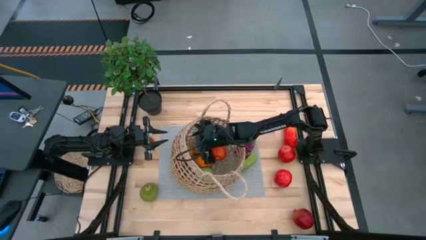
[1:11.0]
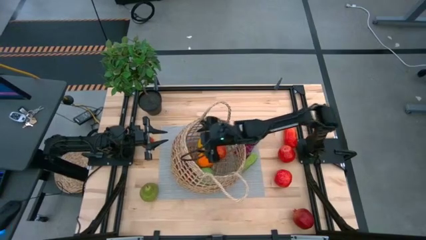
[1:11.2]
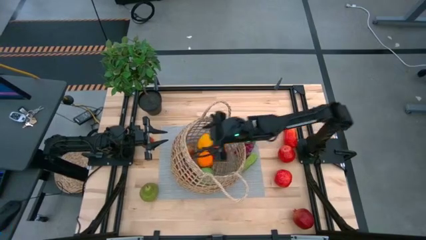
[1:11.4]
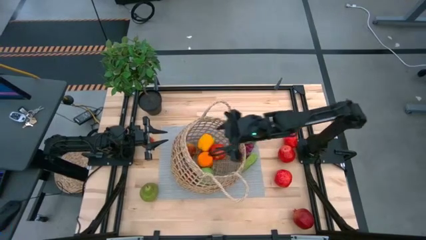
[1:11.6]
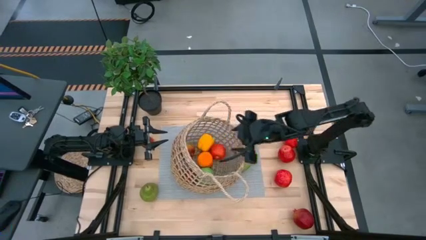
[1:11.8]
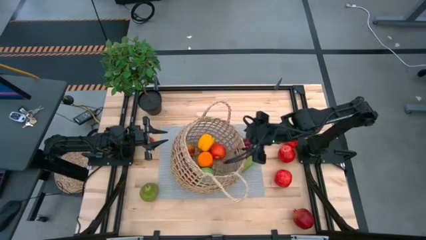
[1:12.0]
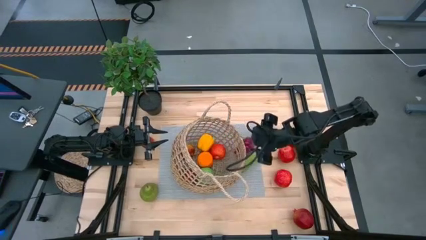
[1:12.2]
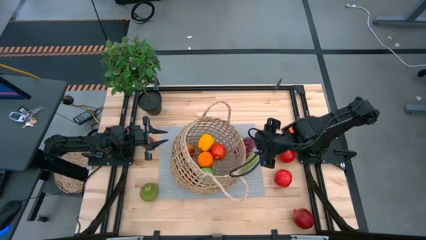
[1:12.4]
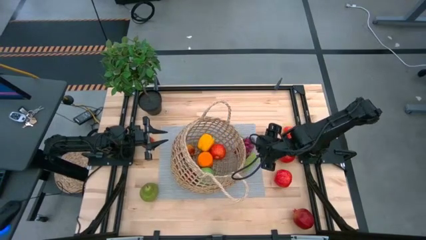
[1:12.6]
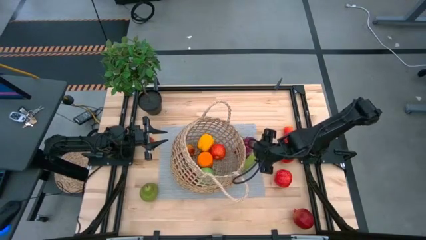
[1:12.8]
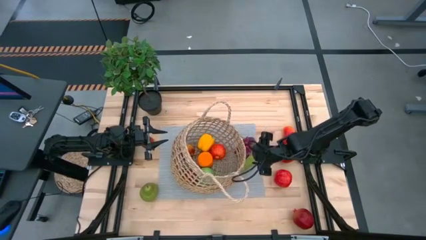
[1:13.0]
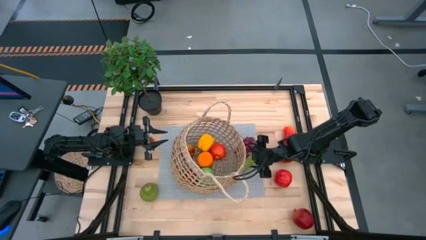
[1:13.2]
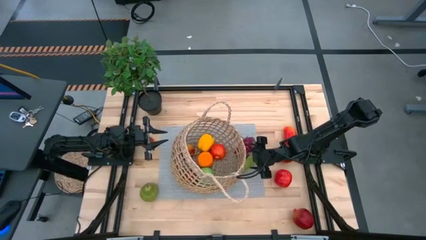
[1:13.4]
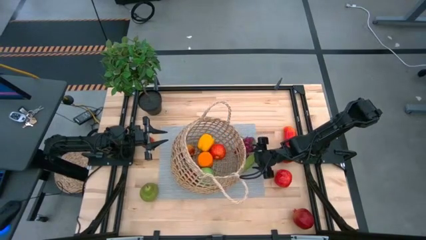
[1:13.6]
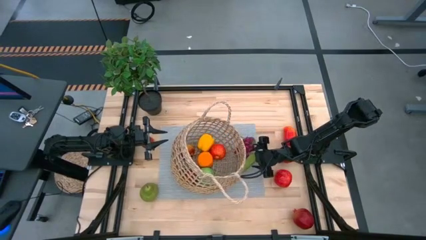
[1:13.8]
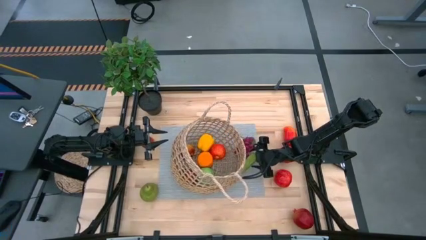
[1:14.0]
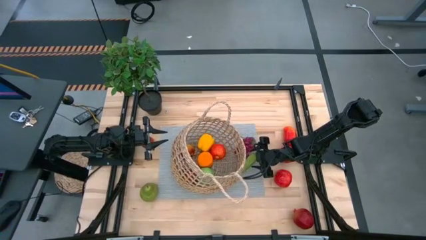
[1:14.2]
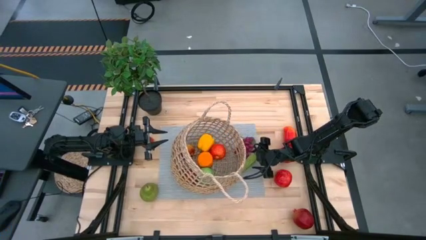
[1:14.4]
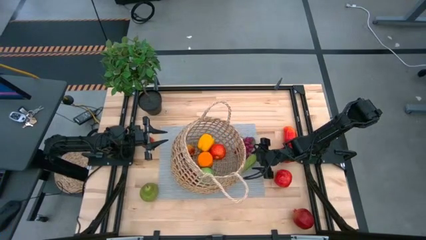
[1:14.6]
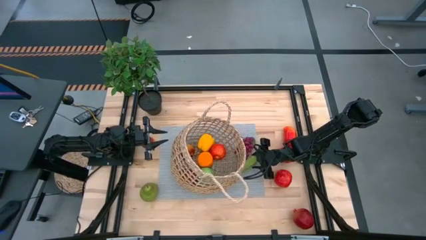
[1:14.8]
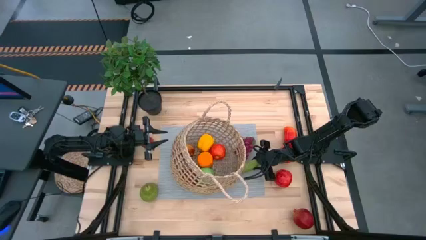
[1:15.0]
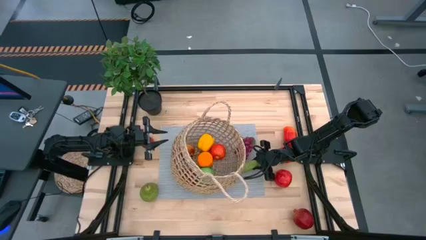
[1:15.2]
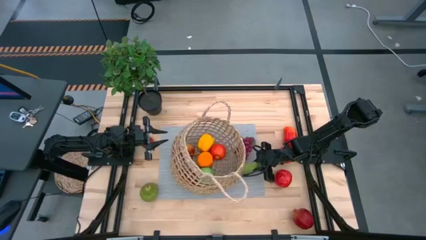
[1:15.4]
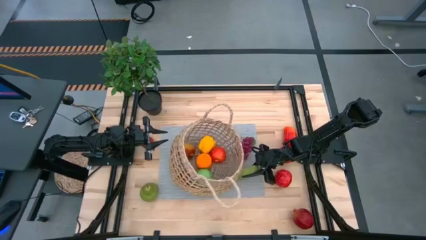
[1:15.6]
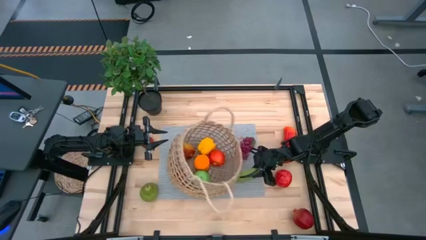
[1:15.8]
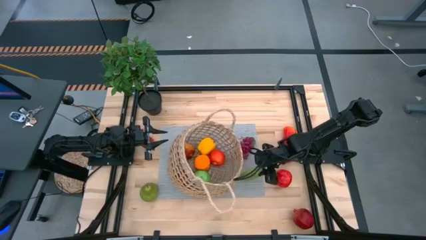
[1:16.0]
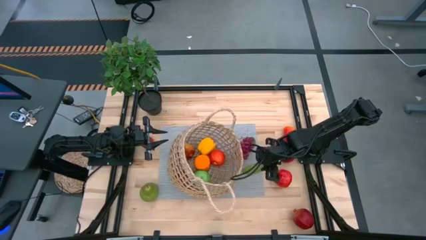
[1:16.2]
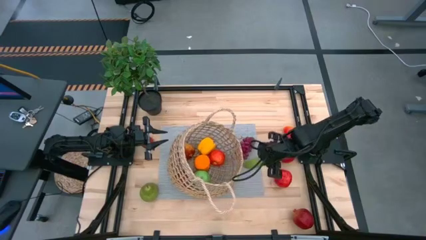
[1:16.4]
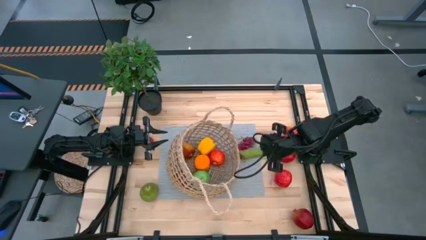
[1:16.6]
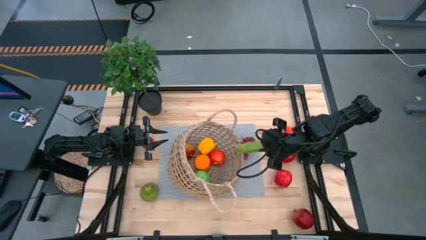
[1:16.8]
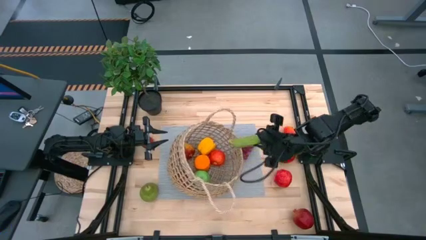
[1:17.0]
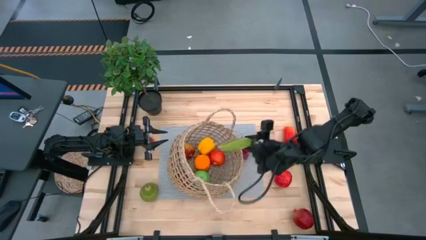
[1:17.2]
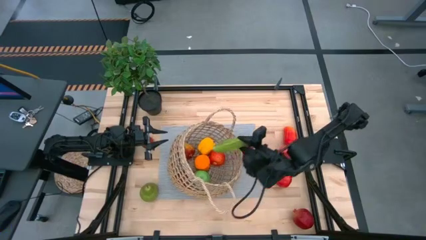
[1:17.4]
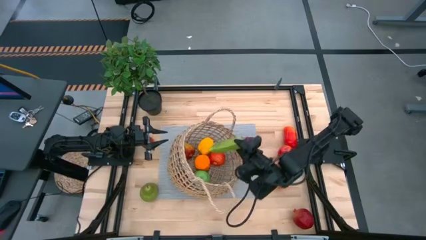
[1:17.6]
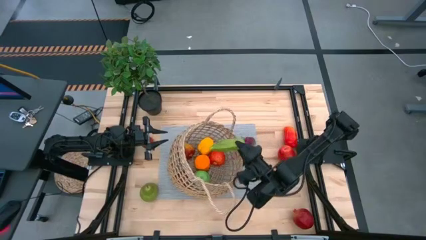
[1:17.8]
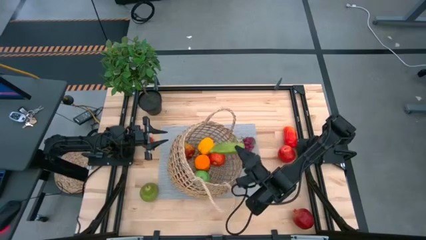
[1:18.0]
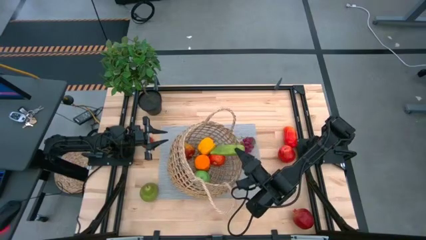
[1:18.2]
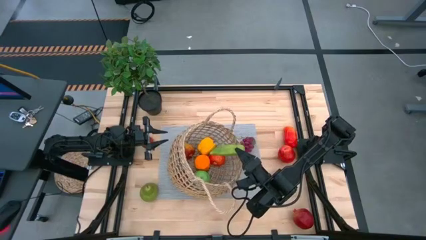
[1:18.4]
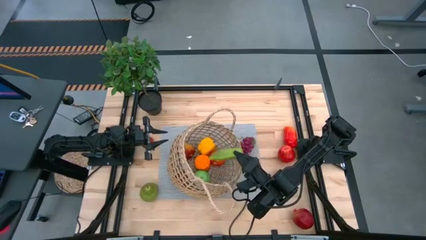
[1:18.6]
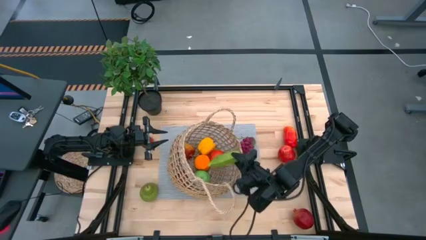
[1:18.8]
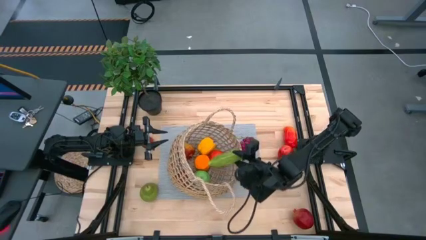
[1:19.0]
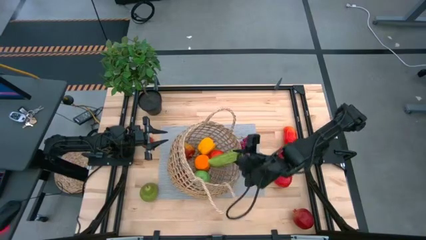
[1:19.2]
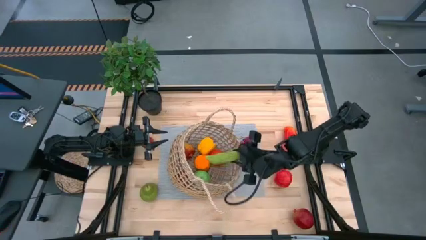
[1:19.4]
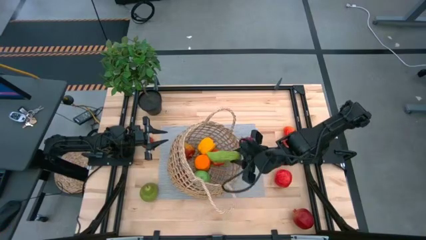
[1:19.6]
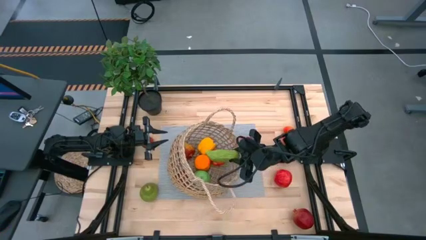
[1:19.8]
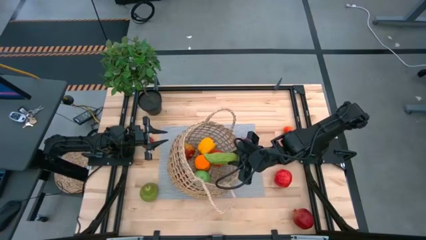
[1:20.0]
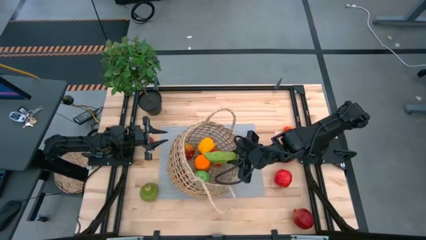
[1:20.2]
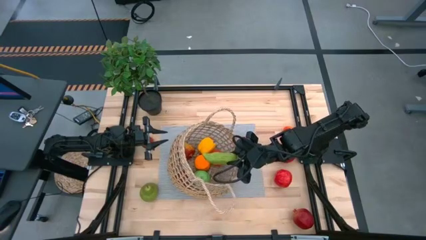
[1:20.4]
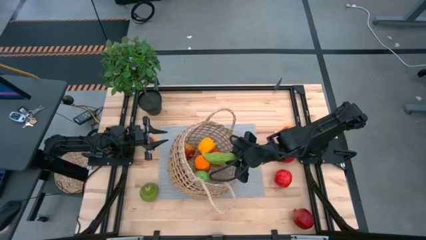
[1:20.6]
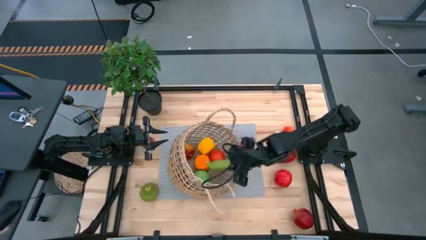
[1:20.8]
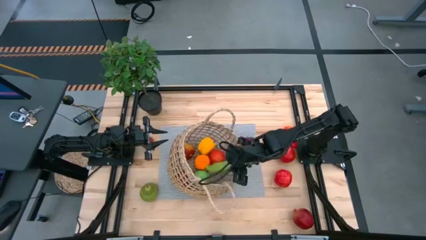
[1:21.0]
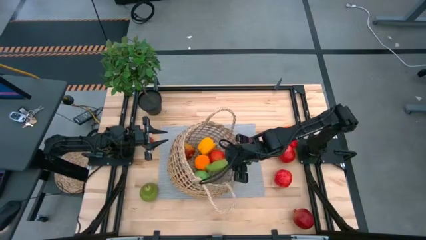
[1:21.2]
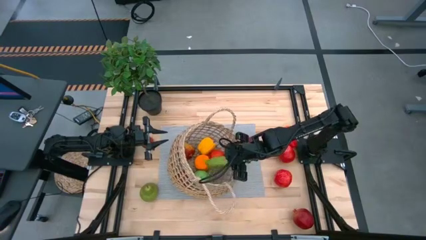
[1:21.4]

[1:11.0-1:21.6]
Task: Build produce basket
Put the green cucumber into the brown basket

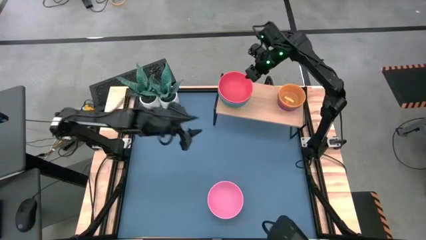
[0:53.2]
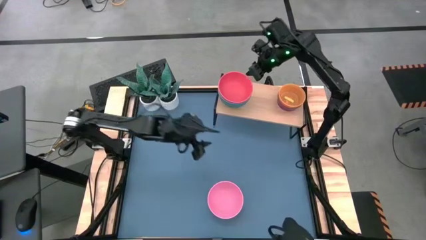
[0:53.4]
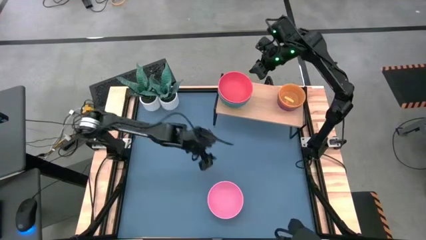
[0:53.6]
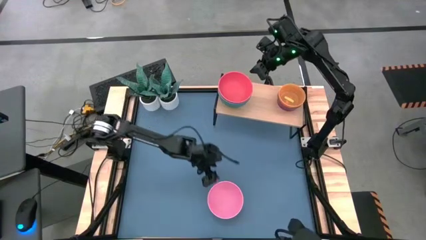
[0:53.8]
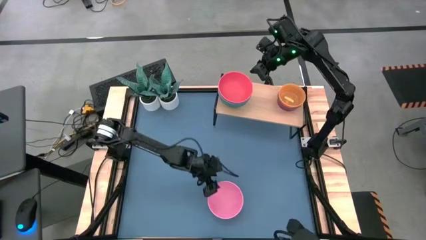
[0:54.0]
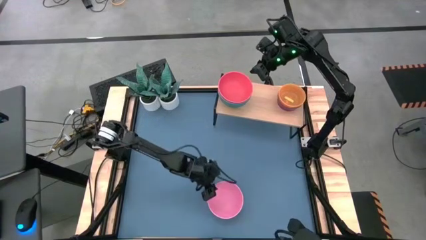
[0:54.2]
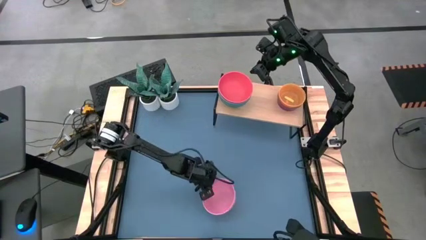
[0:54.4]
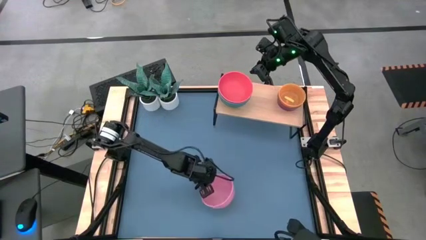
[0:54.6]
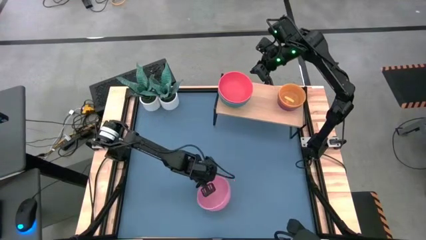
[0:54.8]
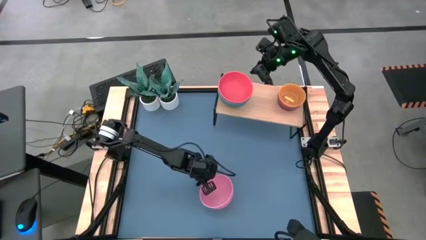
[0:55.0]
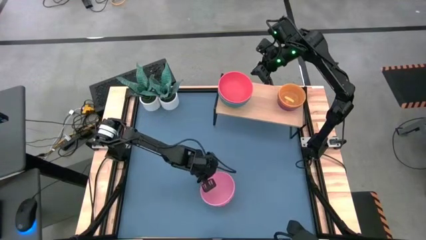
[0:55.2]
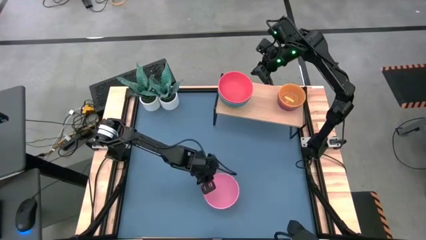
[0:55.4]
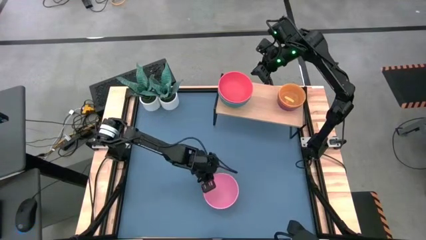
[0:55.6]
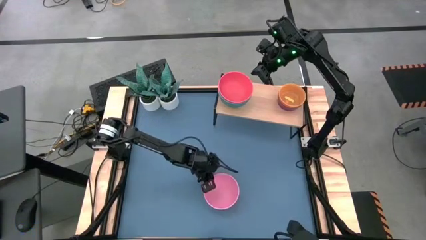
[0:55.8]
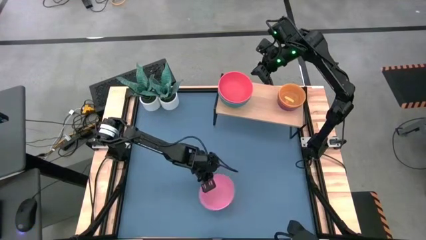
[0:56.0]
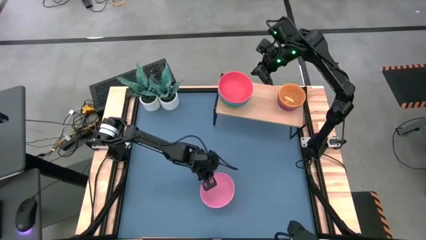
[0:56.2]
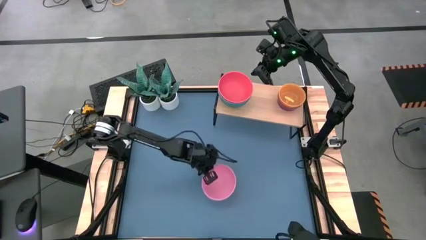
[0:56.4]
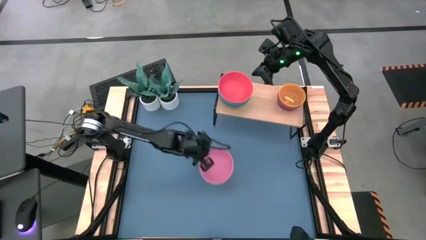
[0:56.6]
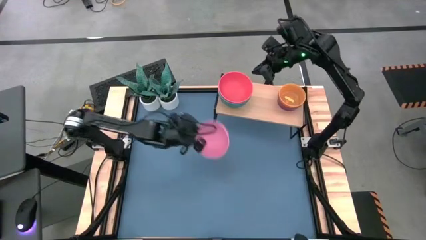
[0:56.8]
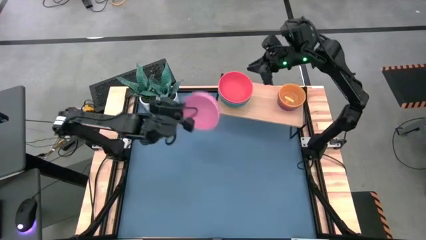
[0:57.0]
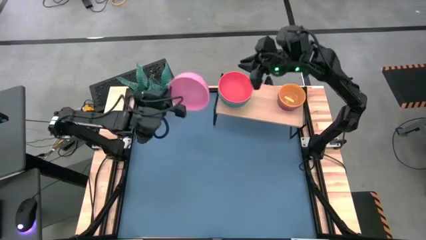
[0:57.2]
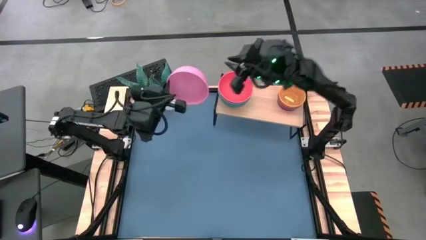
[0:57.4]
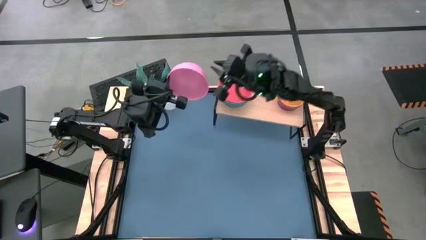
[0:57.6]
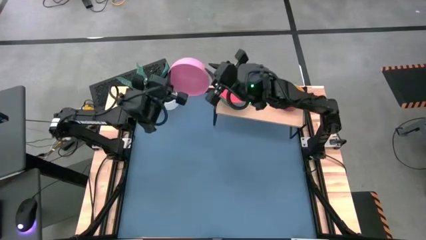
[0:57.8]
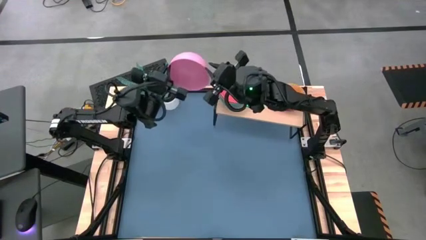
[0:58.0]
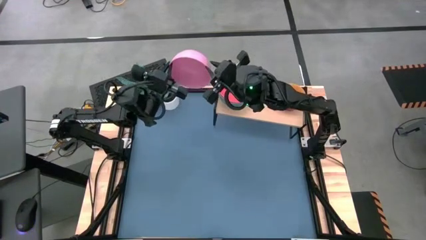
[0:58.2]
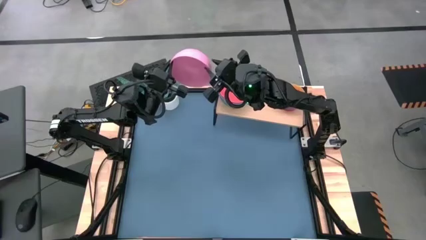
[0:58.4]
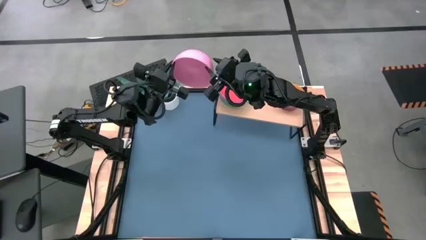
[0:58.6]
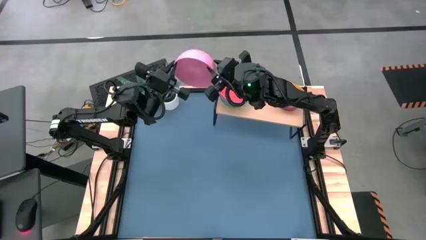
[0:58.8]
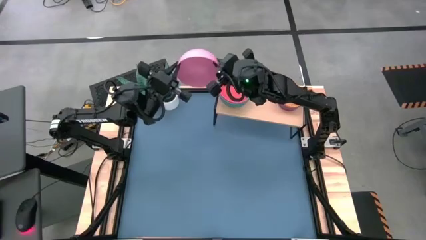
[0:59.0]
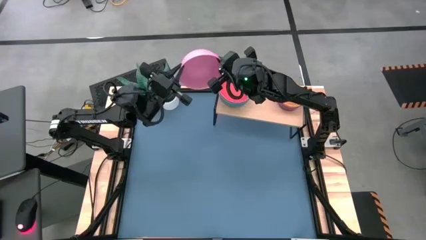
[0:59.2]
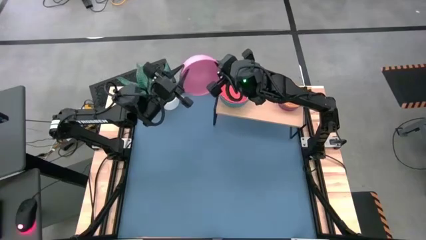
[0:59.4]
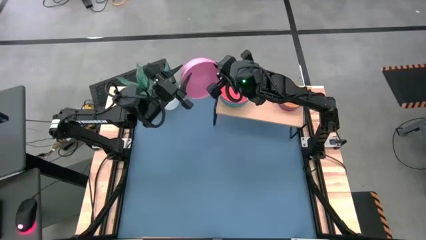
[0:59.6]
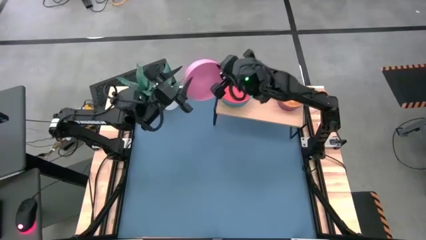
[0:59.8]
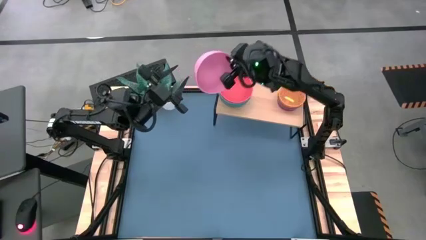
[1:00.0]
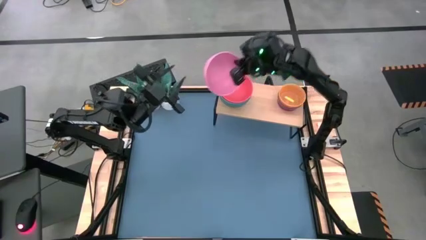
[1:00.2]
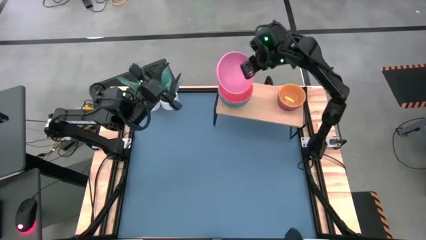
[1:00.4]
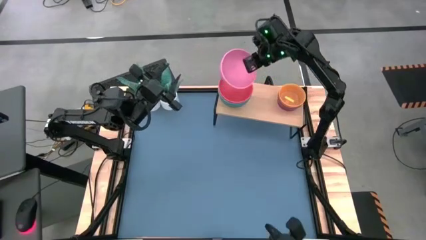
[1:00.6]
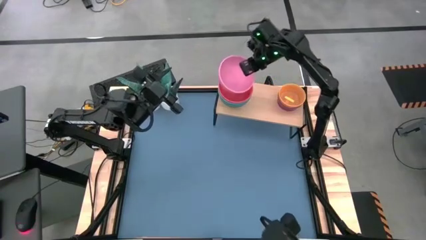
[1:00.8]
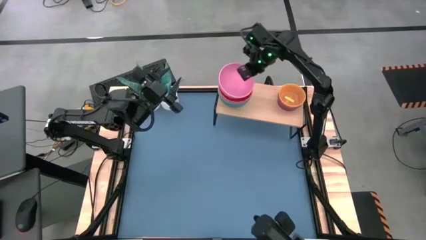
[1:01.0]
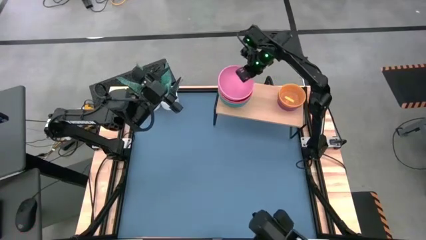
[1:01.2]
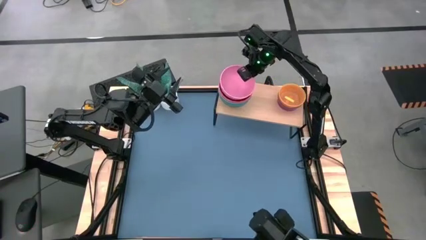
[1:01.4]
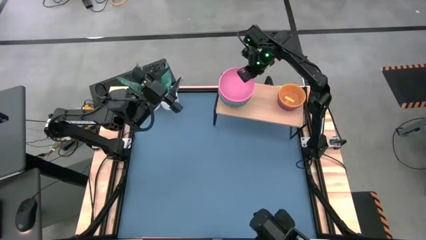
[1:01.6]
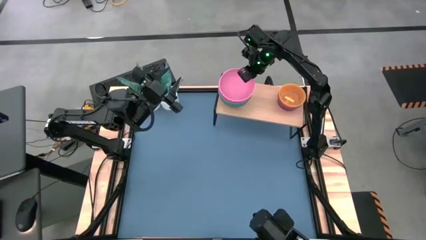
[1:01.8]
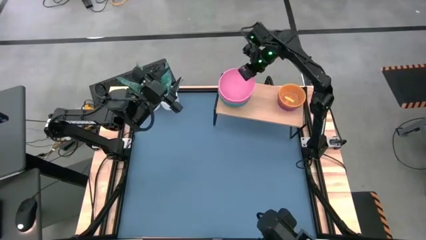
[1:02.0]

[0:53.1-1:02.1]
Task: Place and stack bowls onto a shelf
Stack the big pink bowl on top of the big red bowl on the shelf
